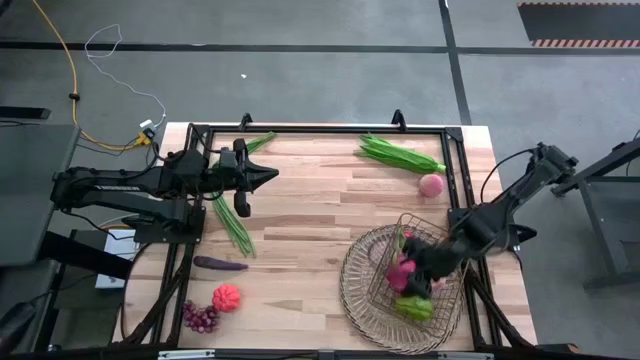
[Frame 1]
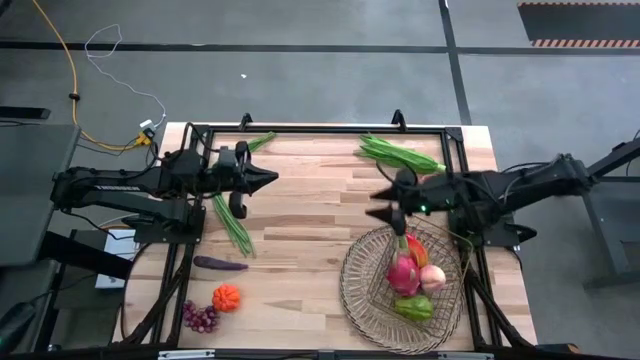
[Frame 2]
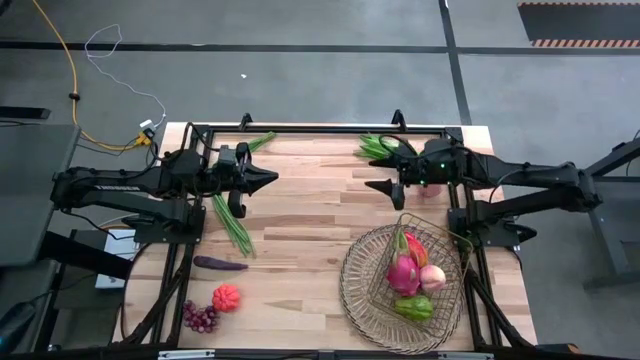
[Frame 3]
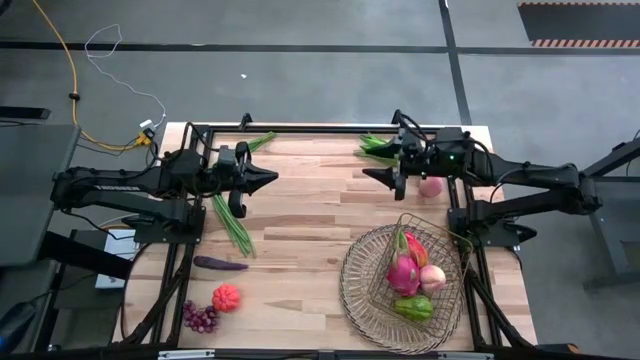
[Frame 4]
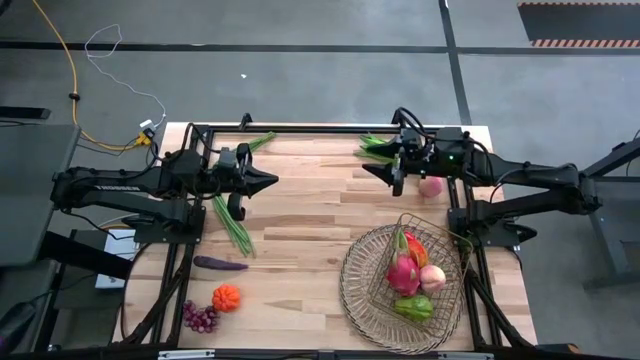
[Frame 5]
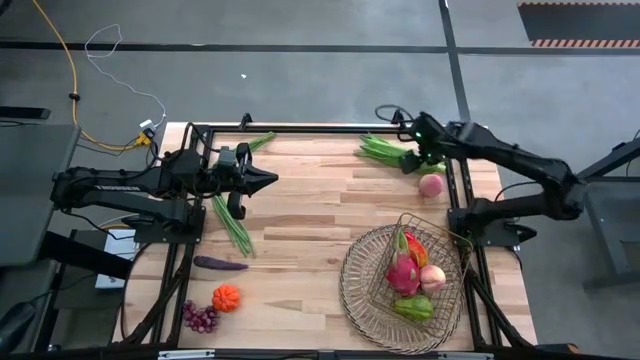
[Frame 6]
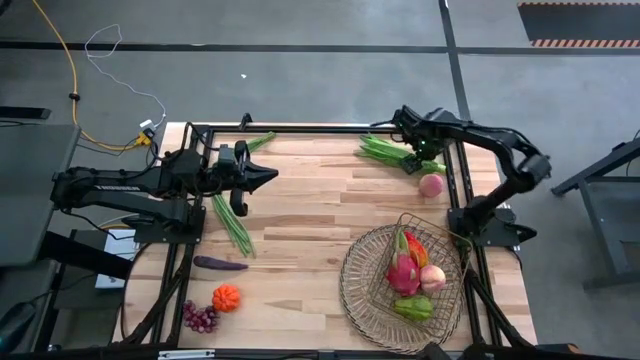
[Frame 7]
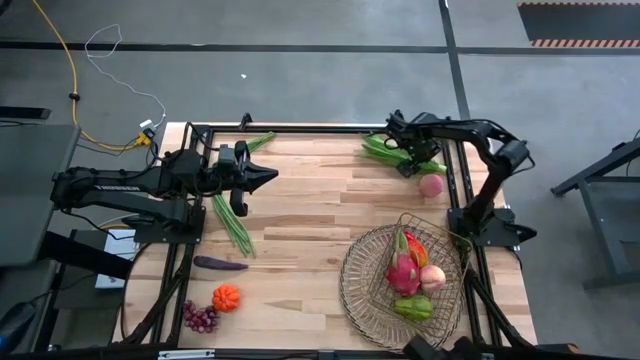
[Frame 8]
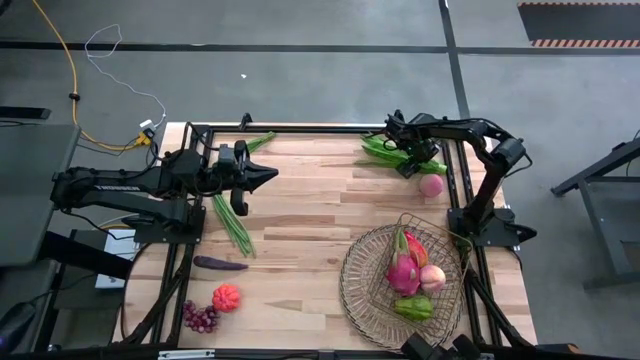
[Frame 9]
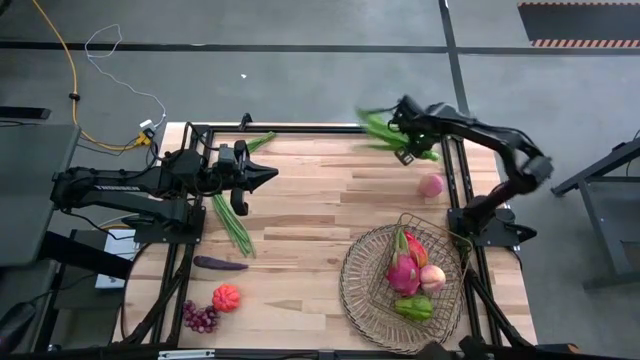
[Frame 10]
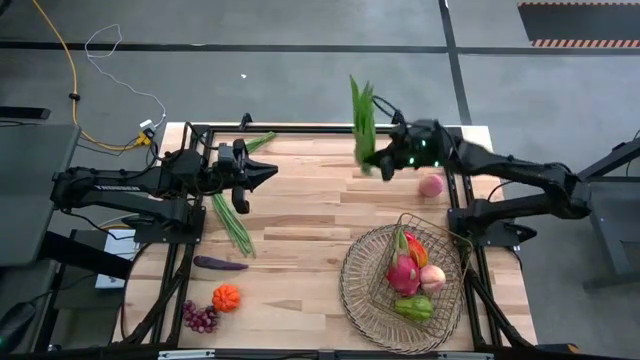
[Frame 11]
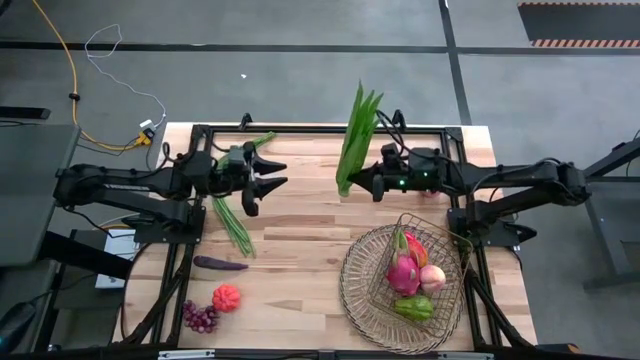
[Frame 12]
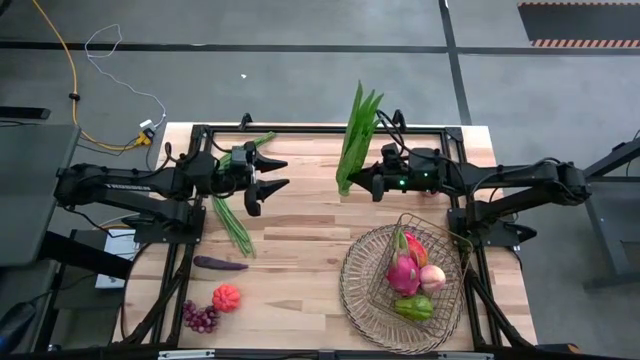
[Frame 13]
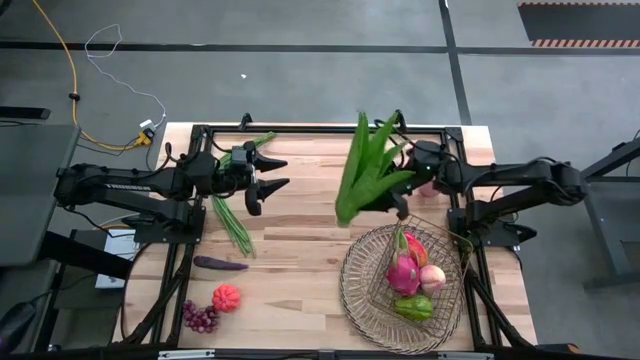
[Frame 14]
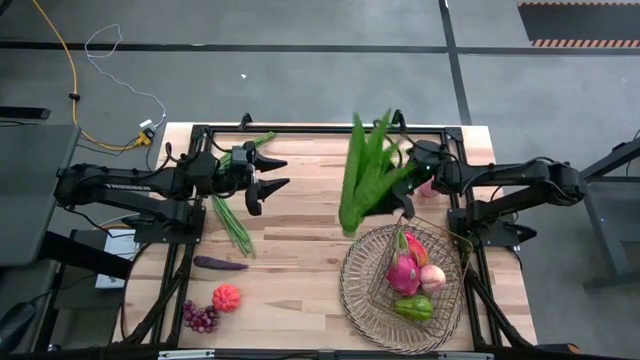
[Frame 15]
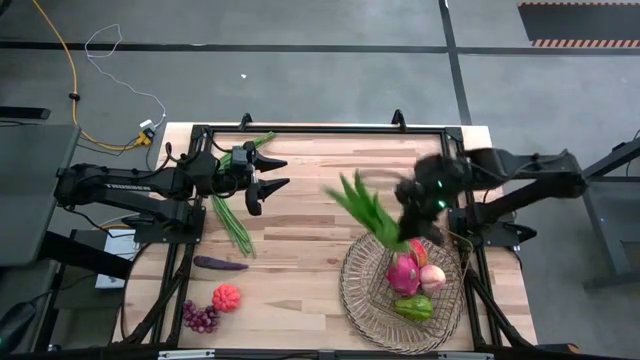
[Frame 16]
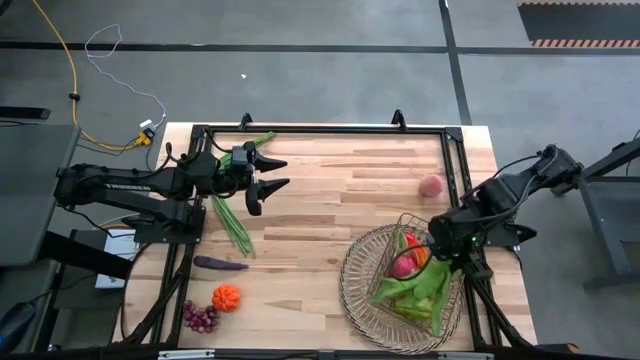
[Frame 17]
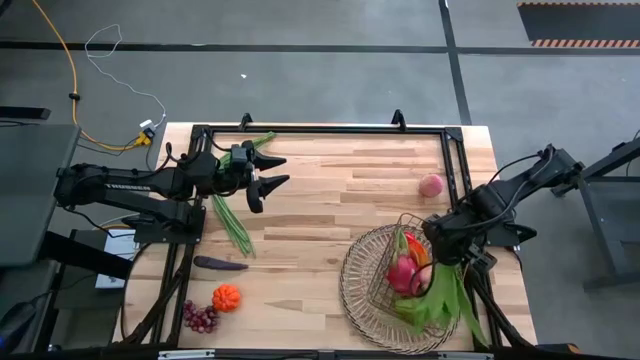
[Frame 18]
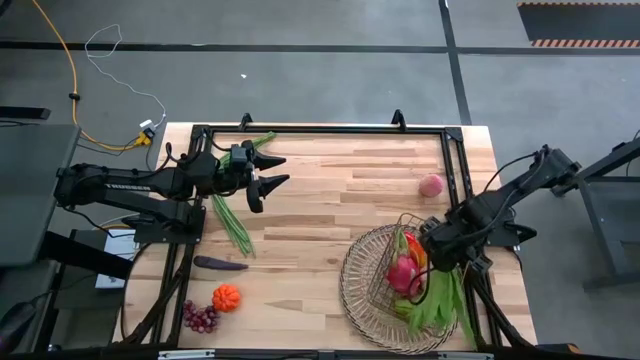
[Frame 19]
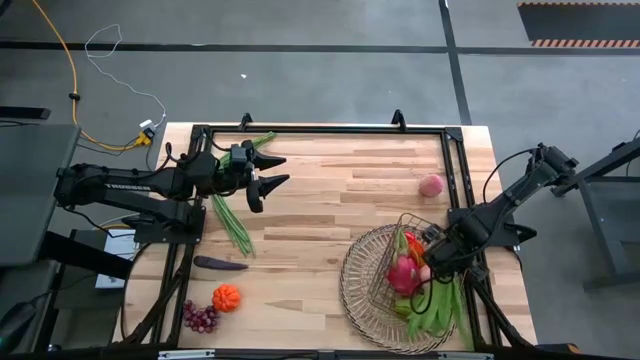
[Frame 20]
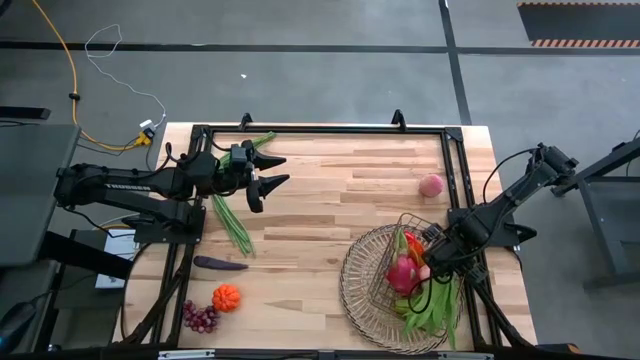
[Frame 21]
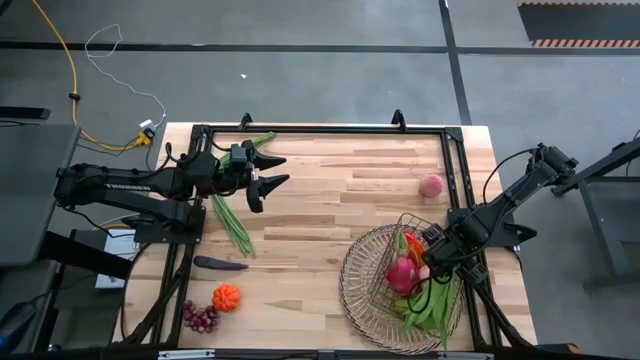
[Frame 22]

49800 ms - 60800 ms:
Task: Build produce basket
Put the leaf lettuce into the wire basket

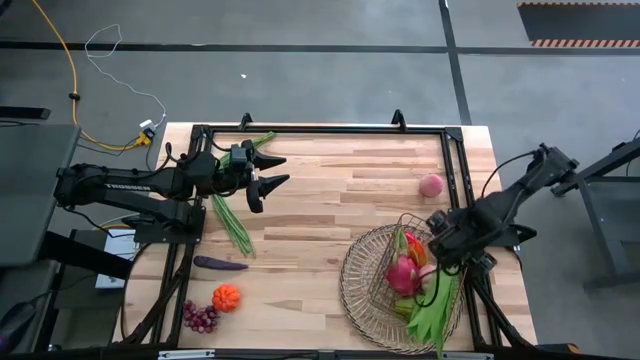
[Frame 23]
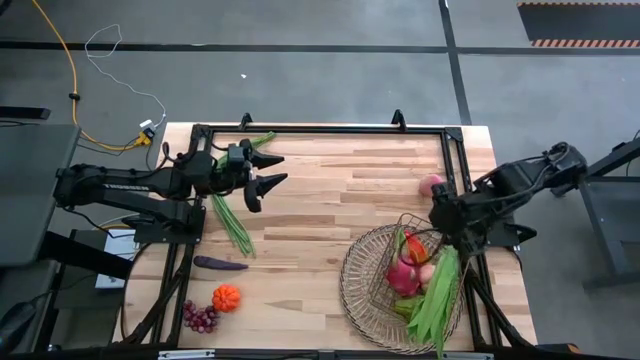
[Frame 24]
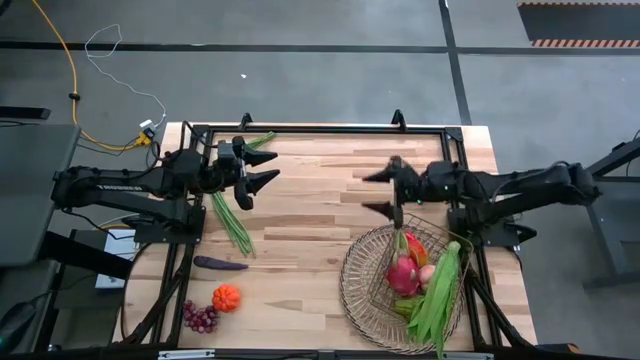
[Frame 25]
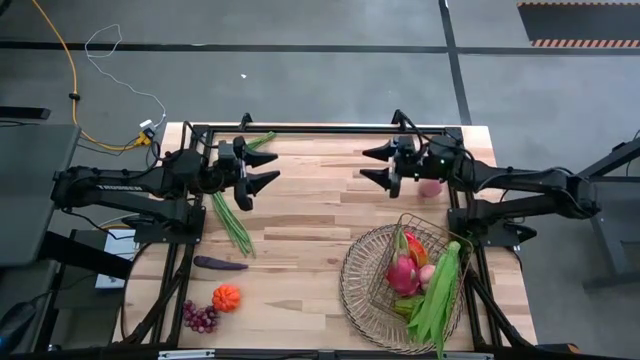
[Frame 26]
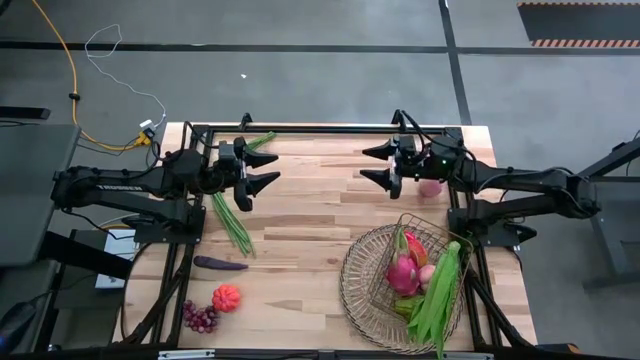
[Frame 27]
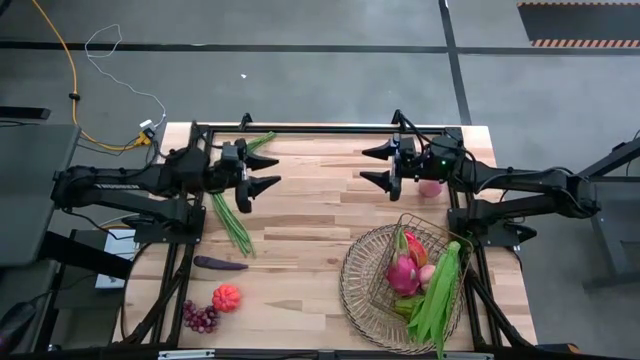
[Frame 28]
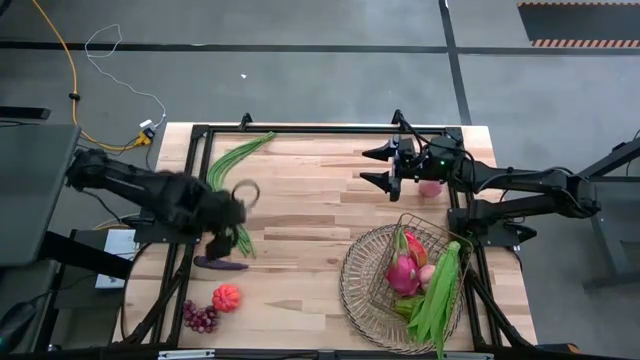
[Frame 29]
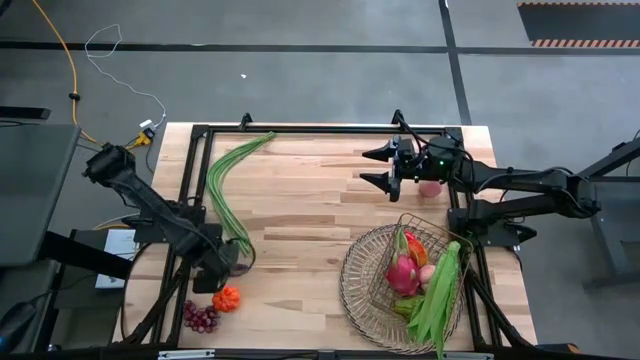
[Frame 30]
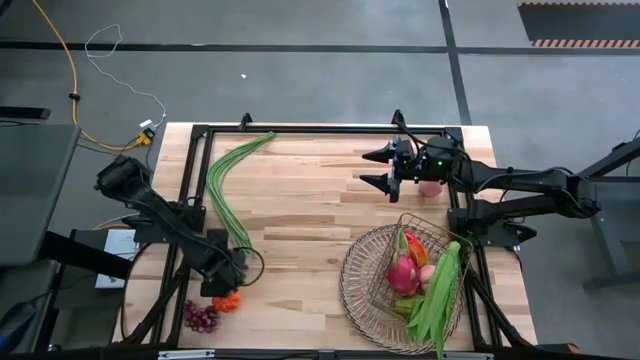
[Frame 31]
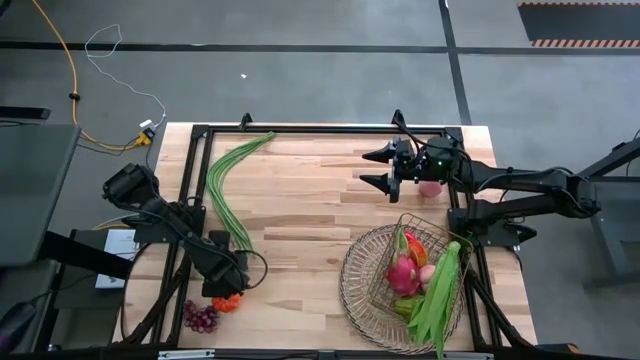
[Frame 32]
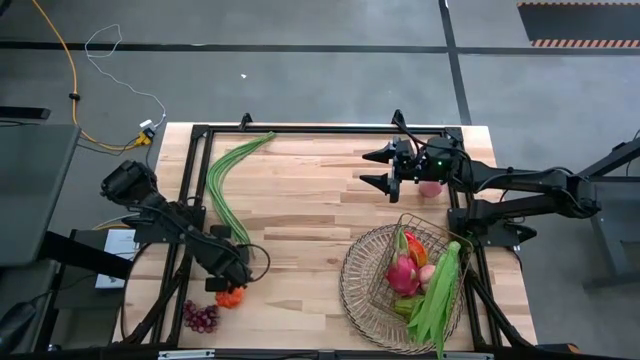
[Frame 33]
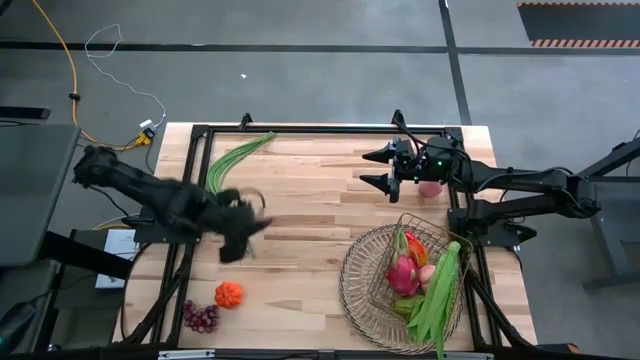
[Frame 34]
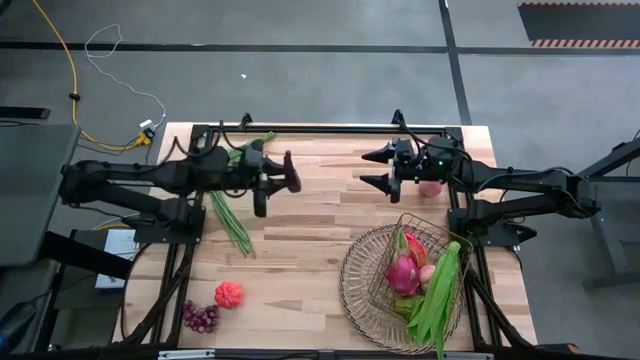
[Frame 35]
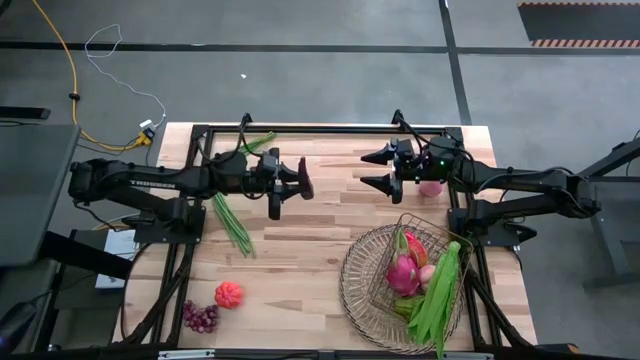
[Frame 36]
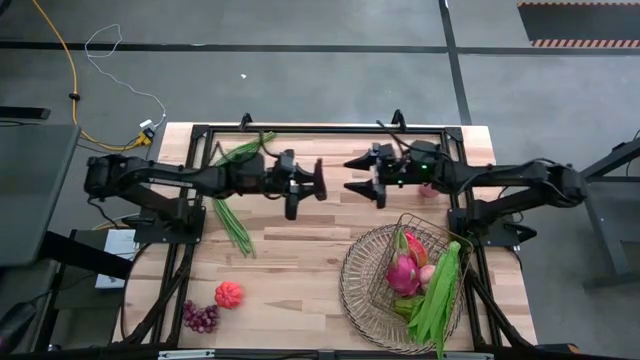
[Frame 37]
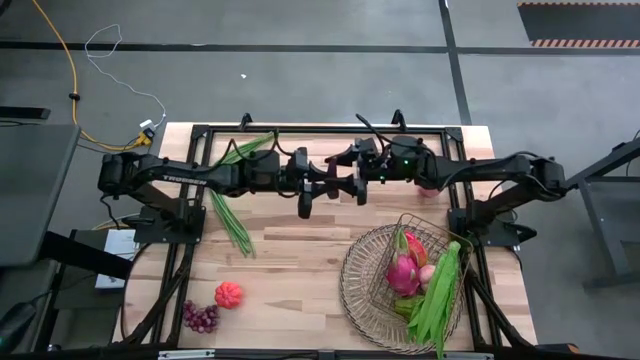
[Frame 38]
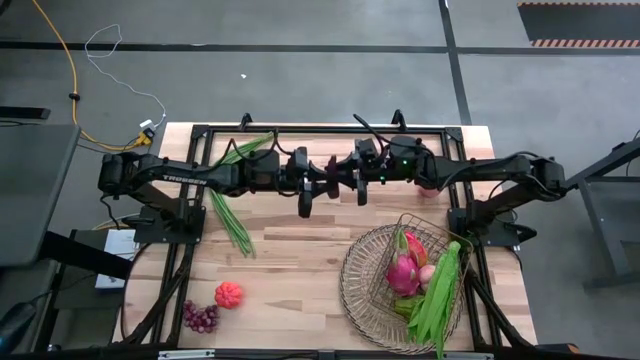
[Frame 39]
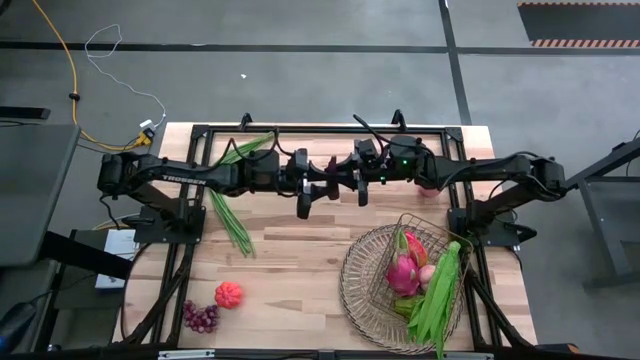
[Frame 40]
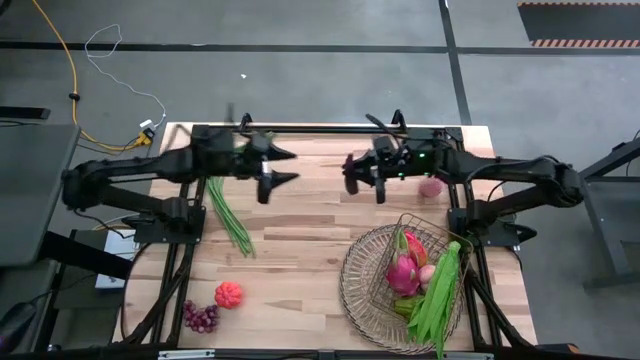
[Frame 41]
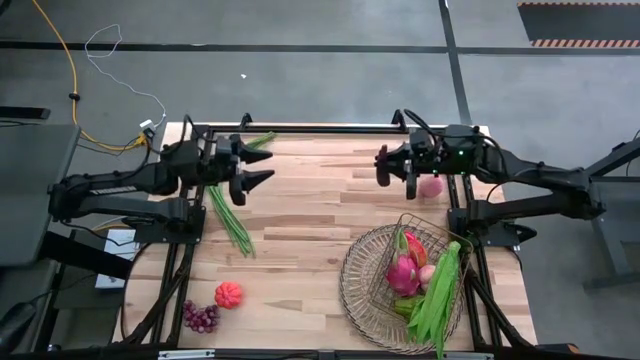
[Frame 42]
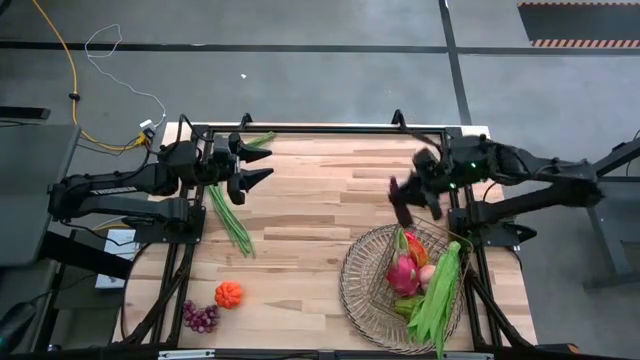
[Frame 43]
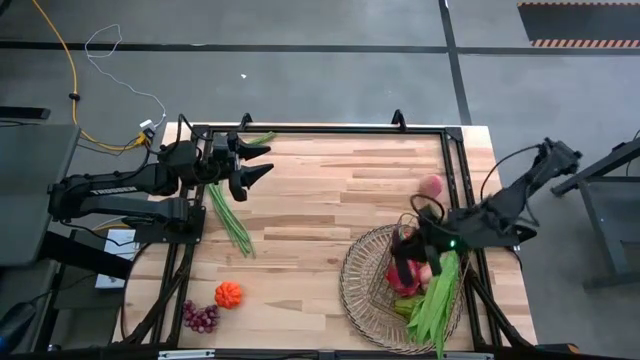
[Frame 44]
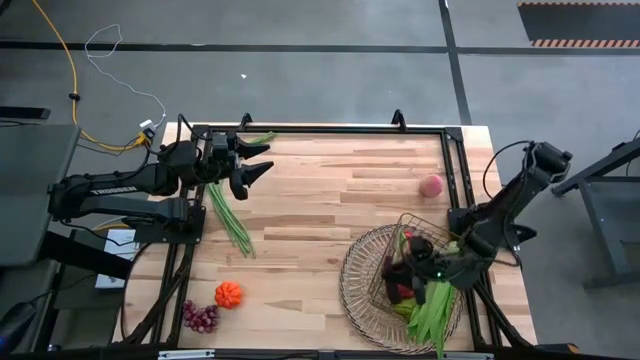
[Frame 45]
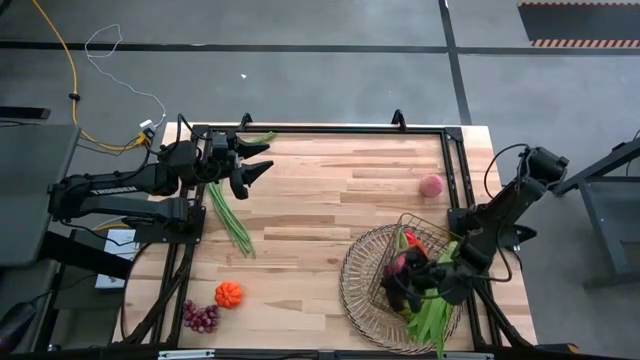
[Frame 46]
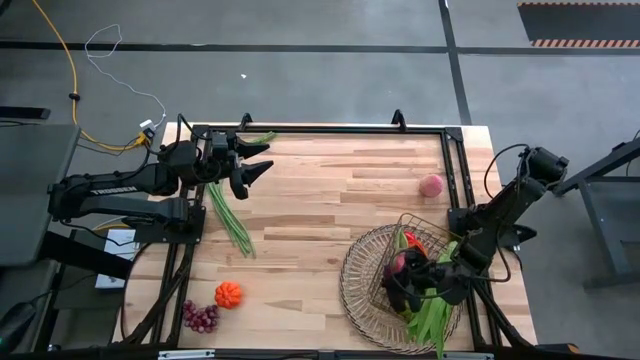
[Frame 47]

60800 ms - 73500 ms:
Put the eggplant into the wire basket
